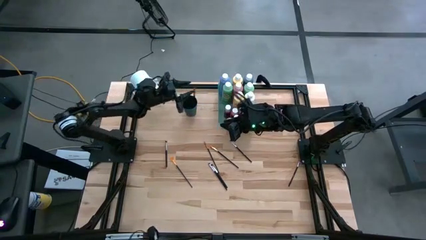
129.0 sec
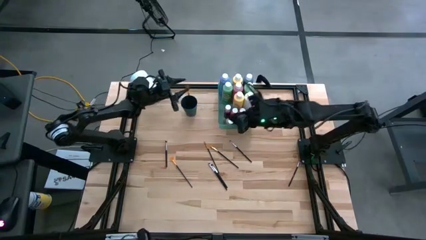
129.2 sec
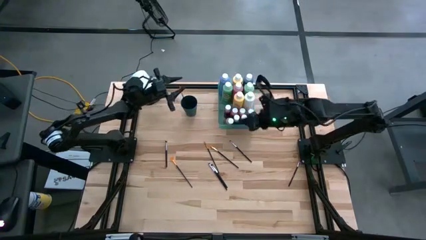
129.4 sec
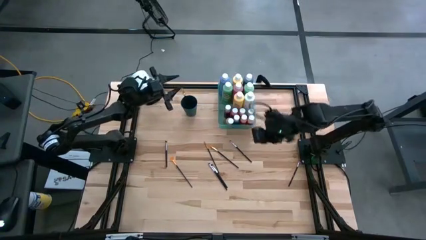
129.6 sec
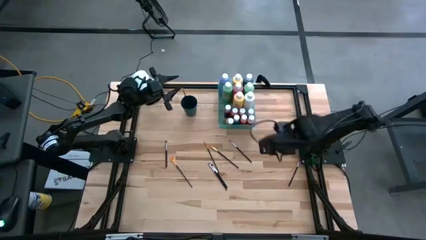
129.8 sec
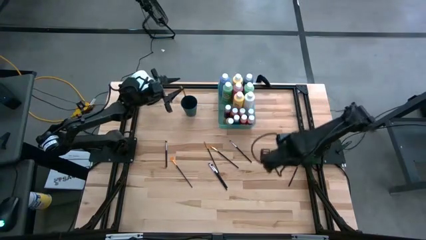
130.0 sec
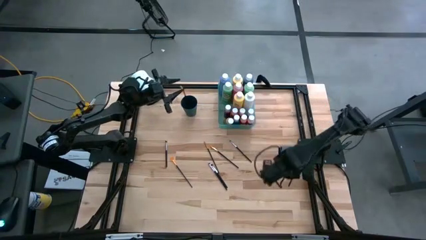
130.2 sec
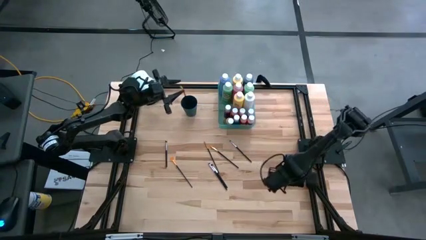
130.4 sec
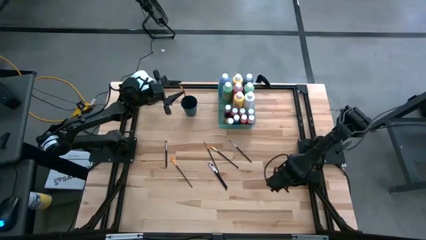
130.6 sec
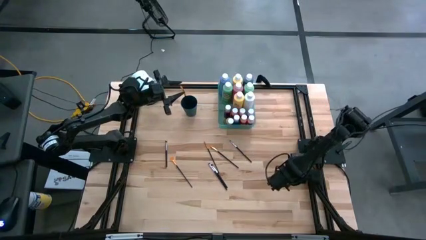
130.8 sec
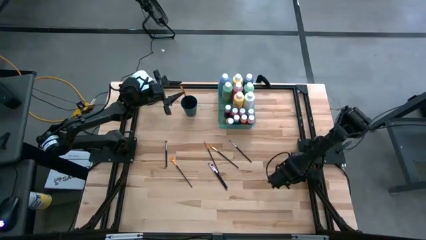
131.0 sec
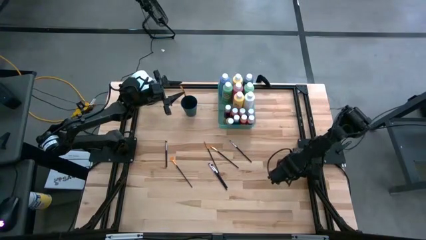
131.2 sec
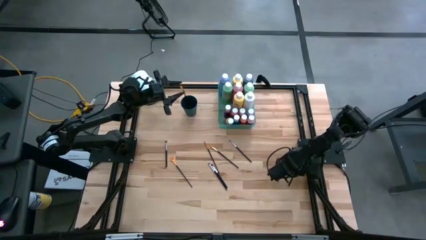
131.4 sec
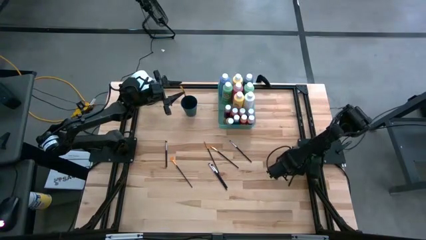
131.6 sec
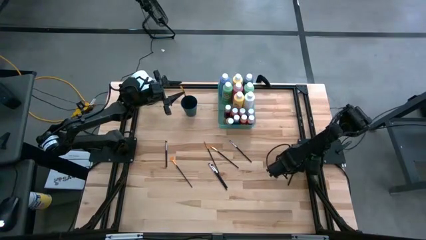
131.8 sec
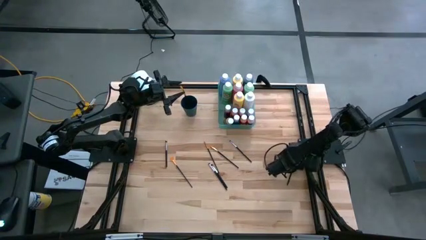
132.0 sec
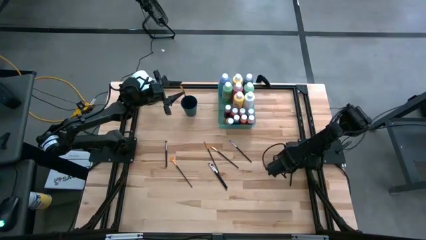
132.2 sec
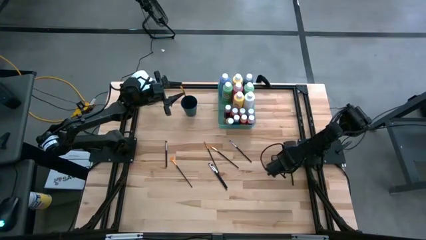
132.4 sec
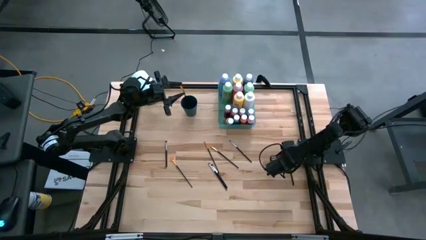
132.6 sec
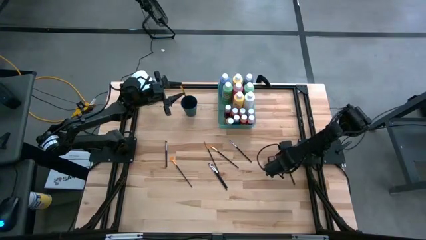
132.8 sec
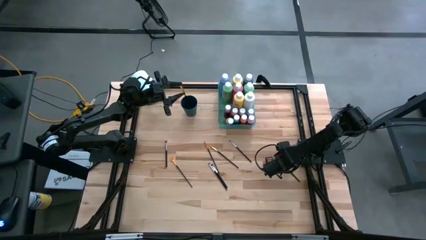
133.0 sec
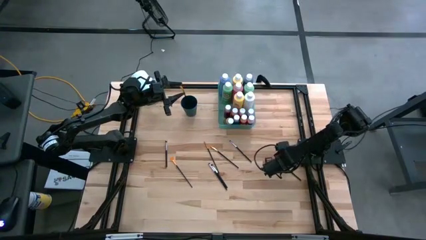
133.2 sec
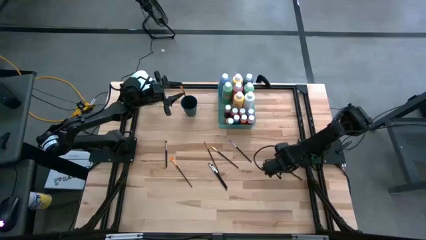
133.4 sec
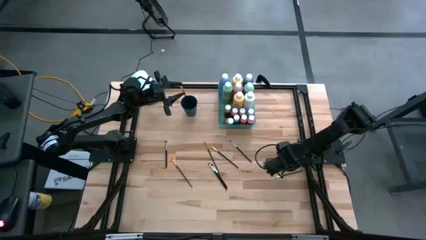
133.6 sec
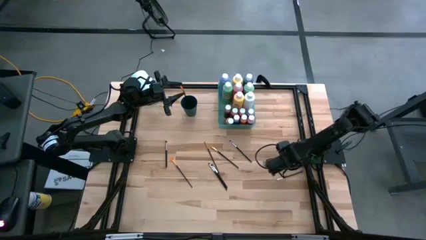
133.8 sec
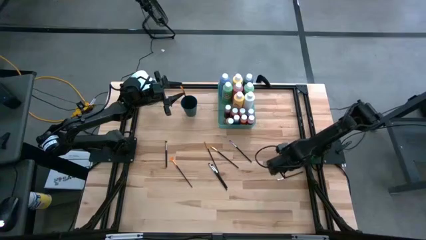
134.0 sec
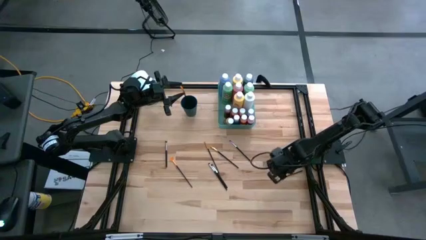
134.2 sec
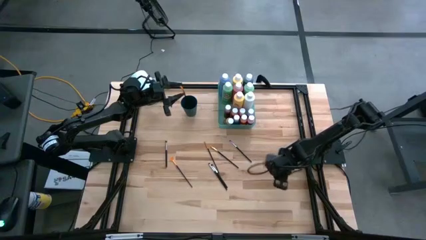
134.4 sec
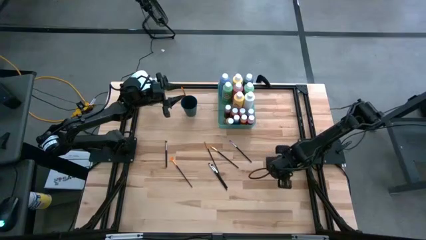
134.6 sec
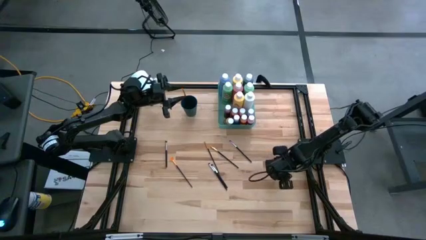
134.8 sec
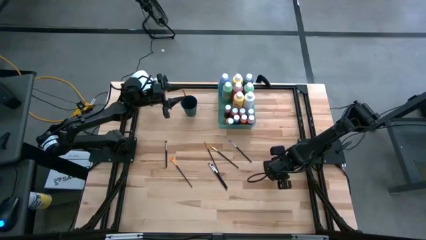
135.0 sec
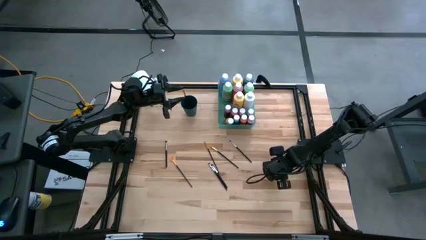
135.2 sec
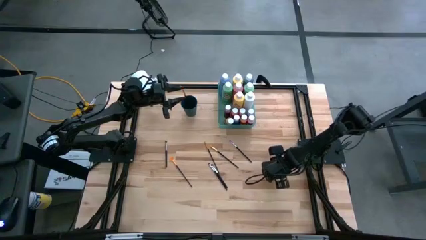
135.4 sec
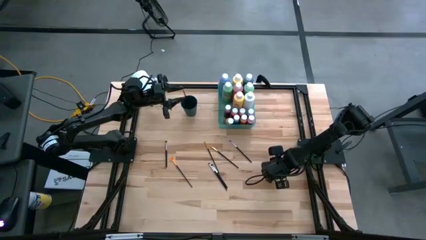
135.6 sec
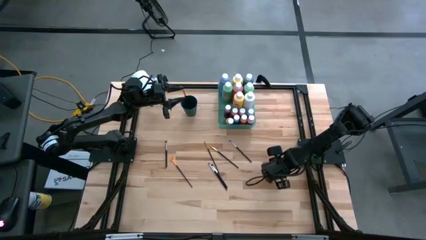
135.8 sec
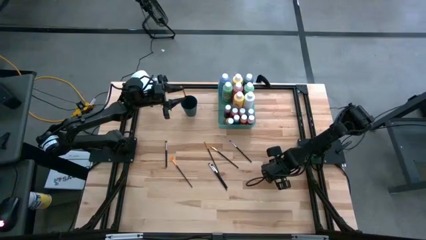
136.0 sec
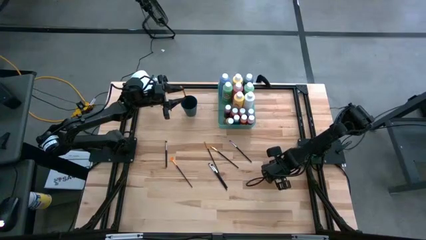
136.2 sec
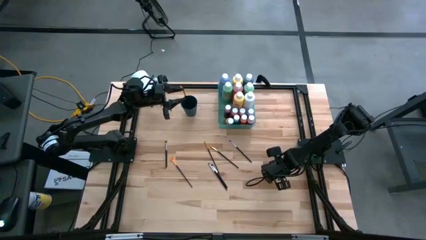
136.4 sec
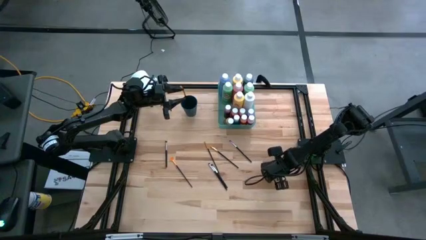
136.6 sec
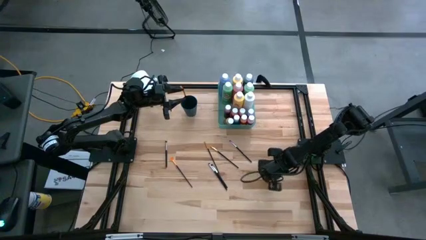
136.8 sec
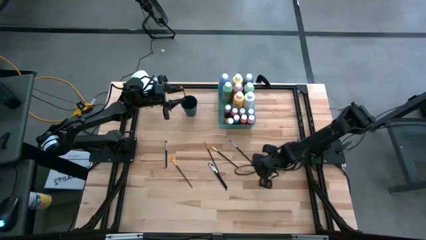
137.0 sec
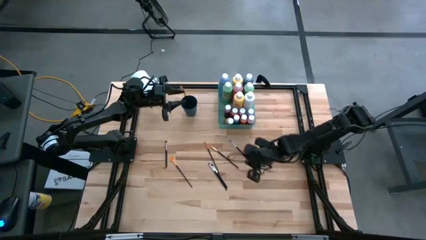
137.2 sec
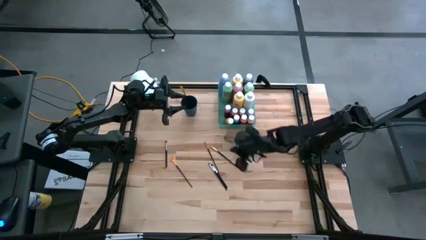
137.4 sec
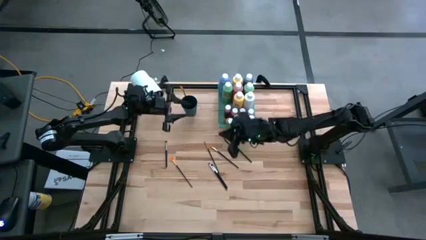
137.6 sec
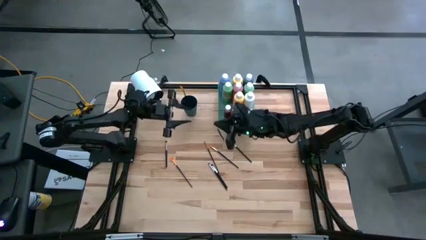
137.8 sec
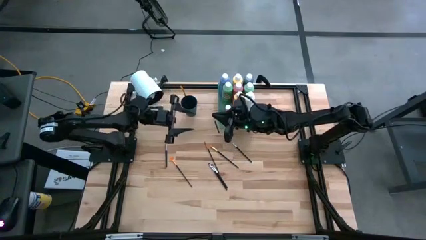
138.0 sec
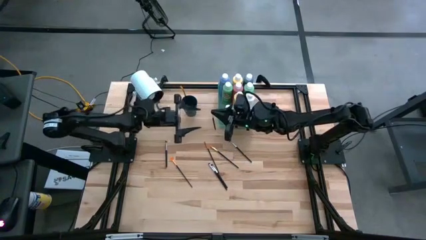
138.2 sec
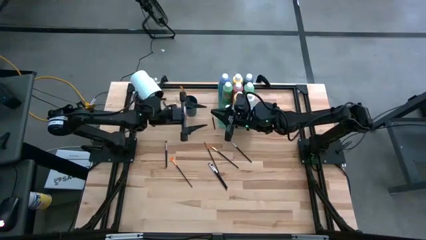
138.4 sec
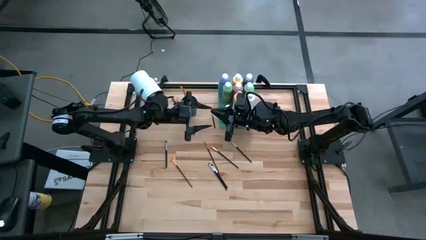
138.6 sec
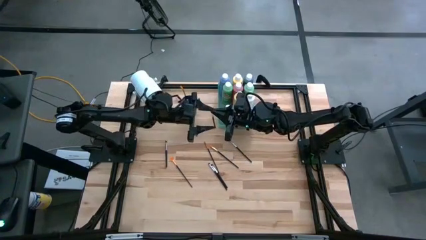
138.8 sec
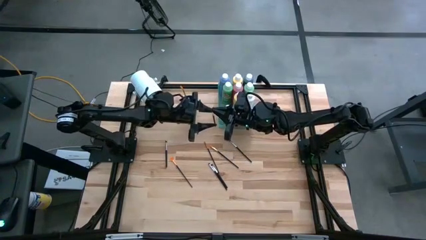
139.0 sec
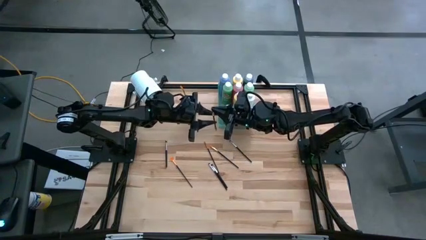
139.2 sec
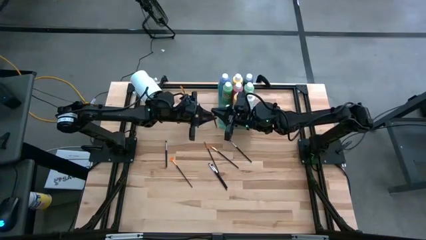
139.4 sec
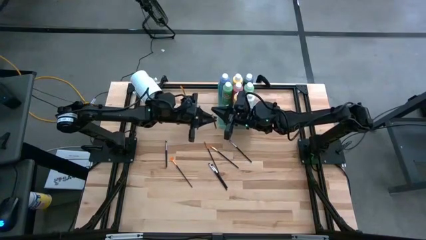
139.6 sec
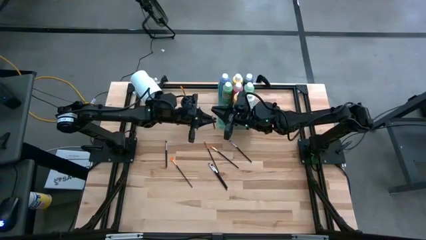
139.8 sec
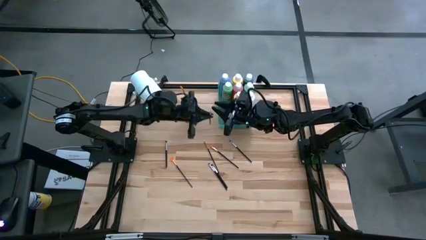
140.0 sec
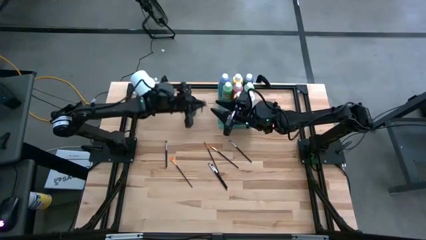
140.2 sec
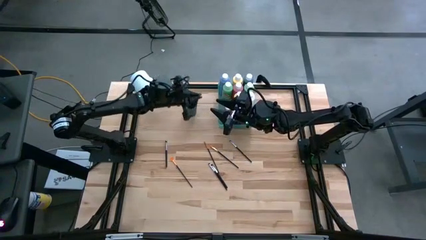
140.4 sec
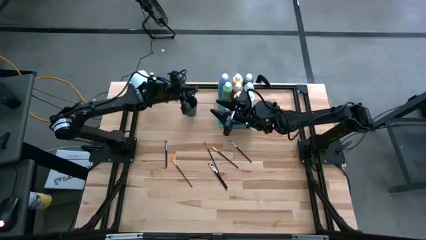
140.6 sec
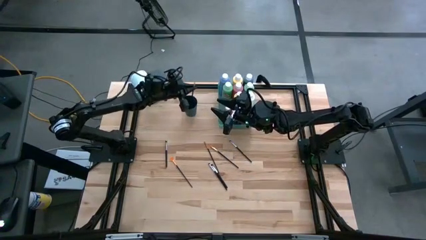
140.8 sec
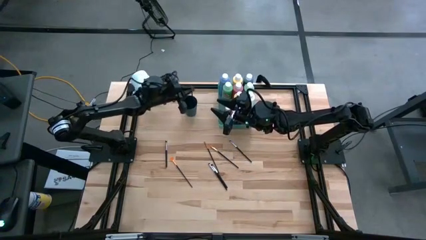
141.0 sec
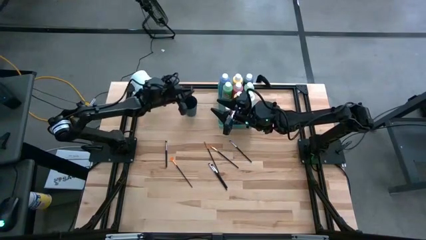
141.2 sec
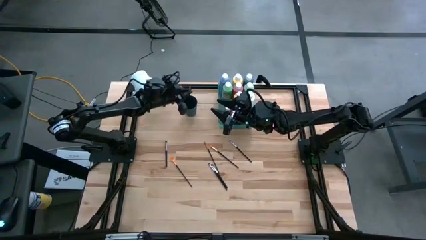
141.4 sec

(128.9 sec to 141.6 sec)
Task: Pick & Place Paint Supplies
Put the black silver paint brush into the black cup

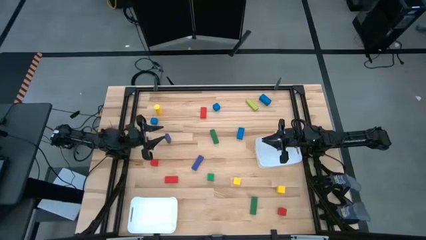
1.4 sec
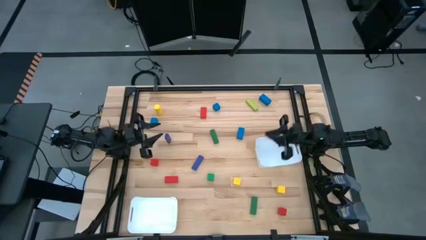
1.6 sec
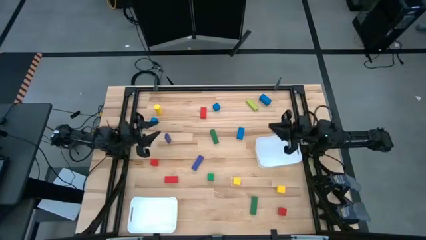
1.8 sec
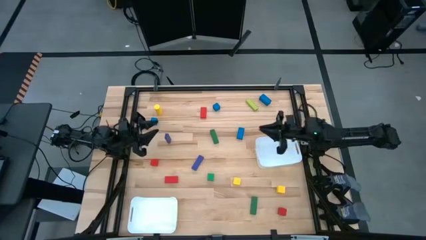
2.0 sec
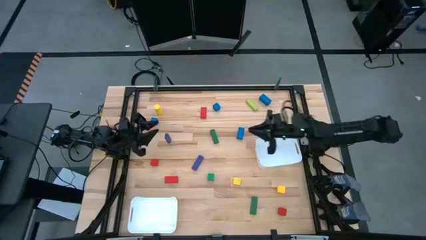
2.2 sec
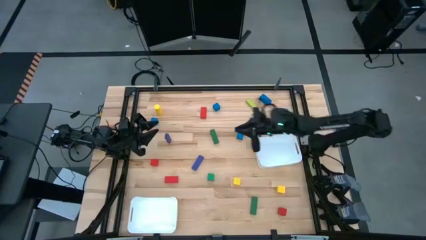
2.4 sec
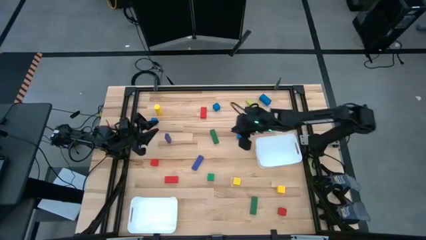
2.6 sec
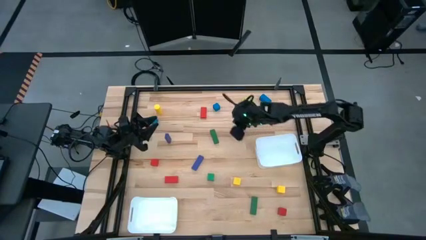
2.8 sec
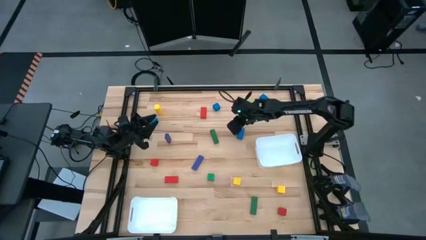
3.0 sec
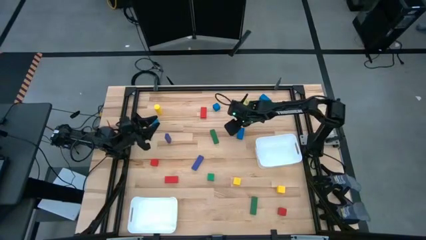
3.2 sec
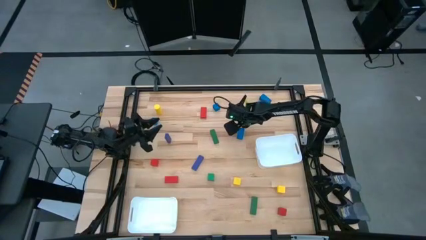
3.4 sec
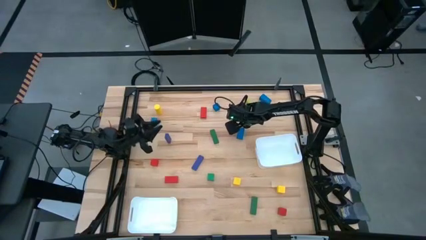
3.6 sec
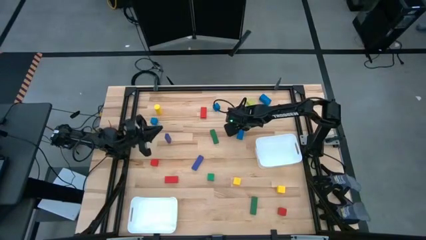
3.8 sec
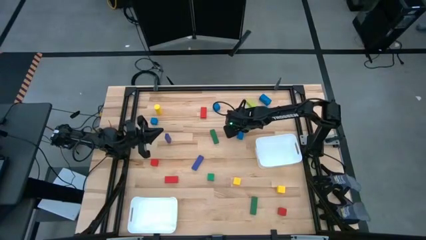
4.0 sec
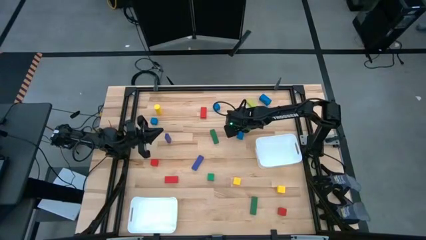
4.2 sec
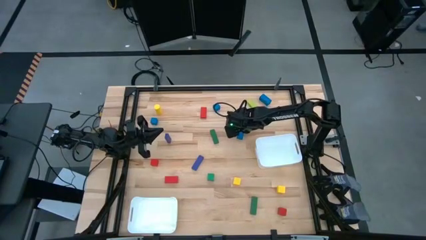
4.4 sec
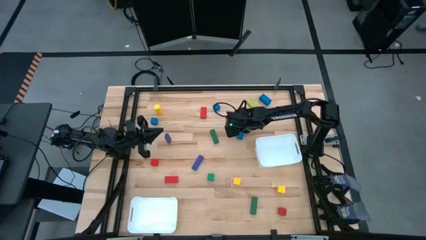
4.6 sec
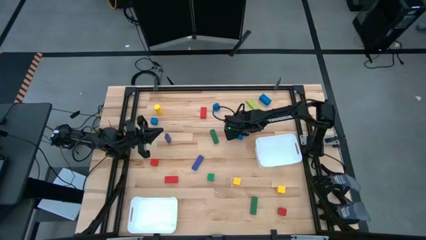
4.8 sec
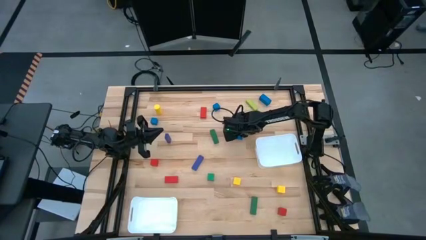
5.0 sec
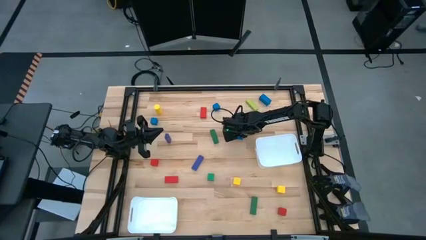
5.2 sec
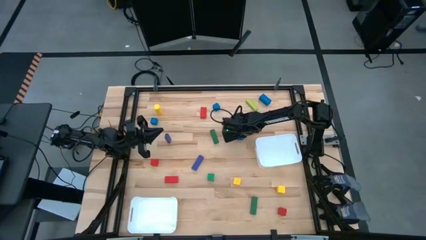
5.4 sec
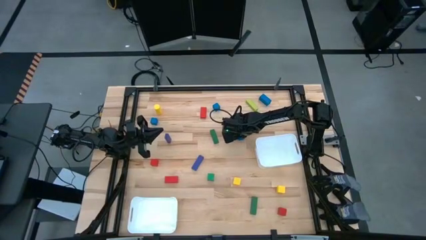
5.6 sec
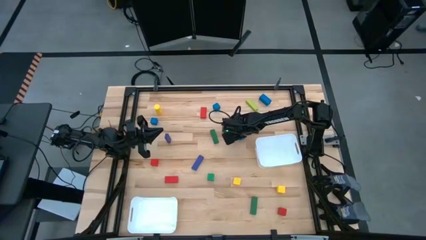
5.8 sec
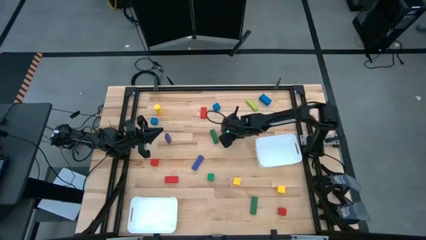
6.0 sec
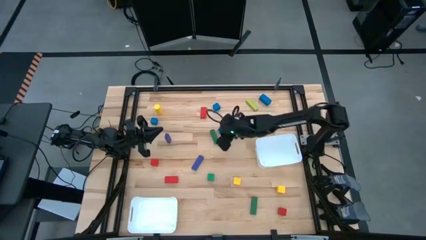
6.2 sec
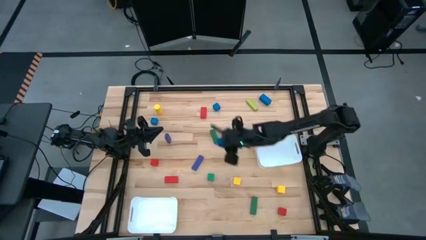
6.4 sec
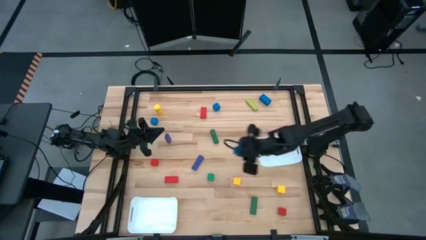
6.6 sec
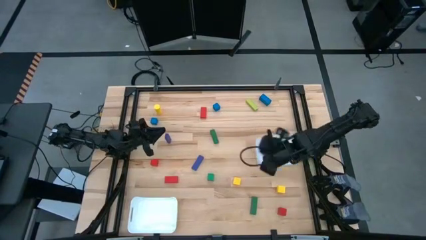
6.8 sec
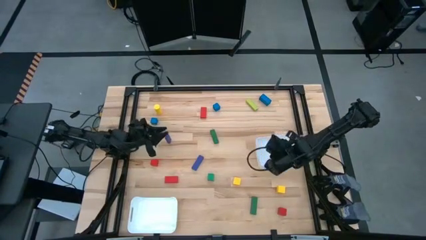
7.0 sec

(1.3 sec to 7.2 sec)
Task: Sort blocks by size
Put the blue rectangular block into the top white bin
